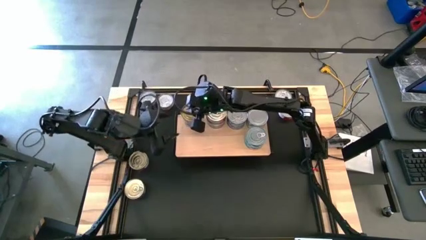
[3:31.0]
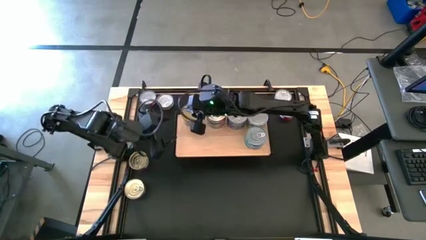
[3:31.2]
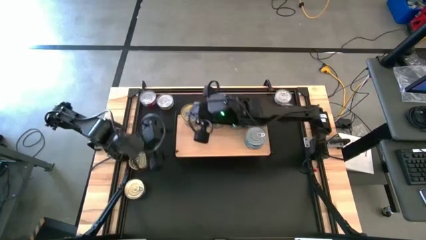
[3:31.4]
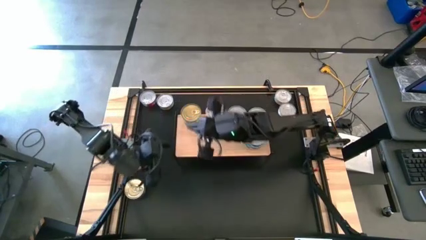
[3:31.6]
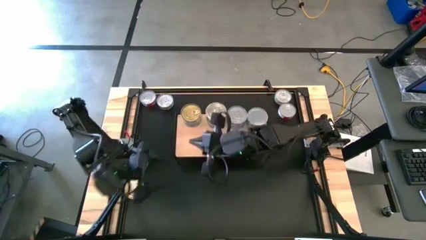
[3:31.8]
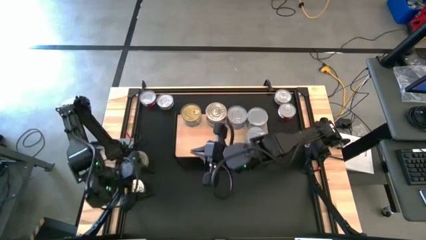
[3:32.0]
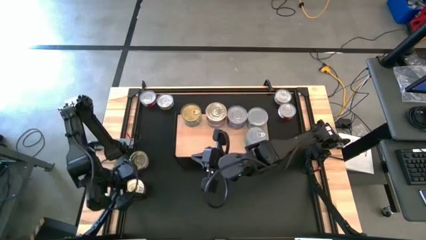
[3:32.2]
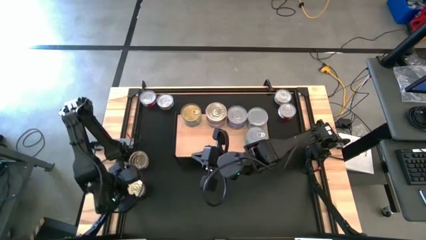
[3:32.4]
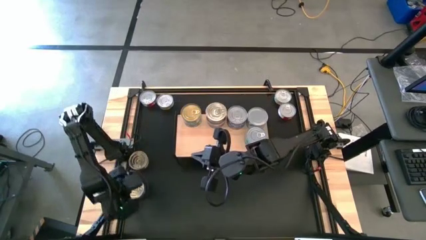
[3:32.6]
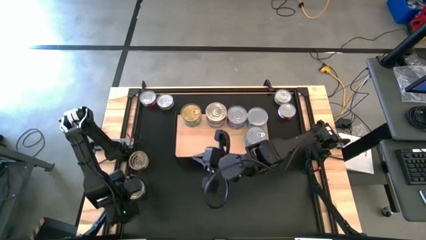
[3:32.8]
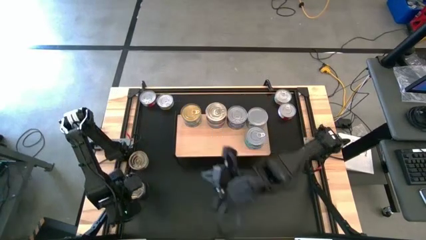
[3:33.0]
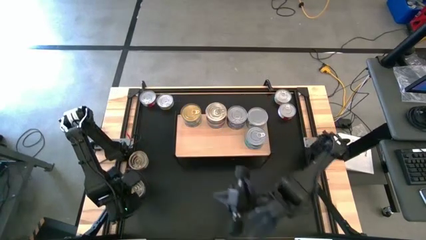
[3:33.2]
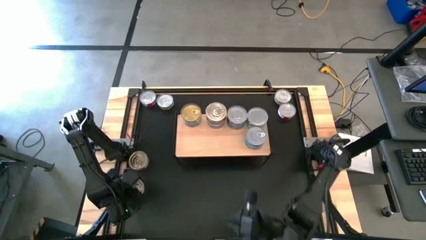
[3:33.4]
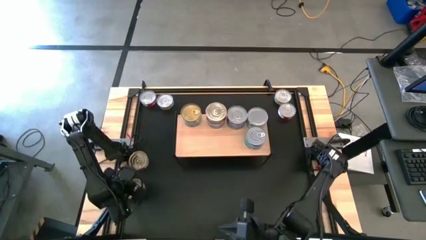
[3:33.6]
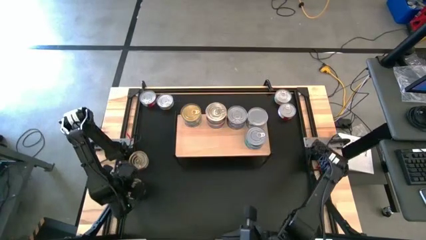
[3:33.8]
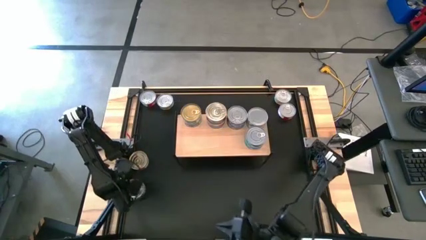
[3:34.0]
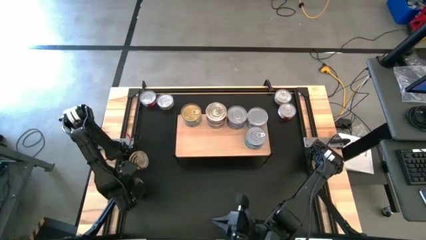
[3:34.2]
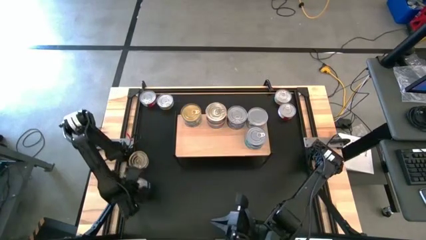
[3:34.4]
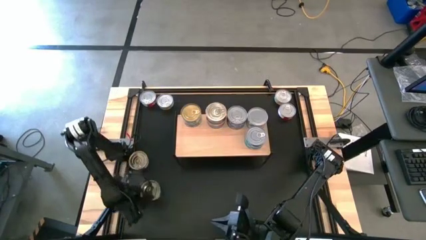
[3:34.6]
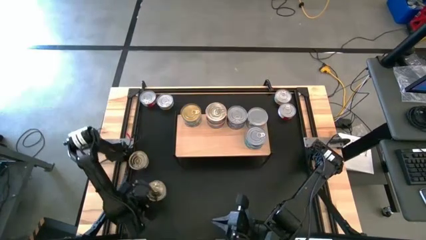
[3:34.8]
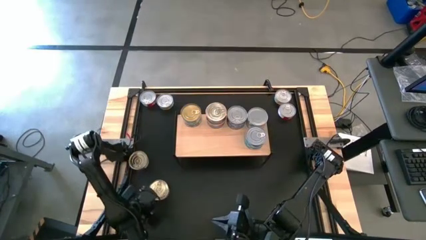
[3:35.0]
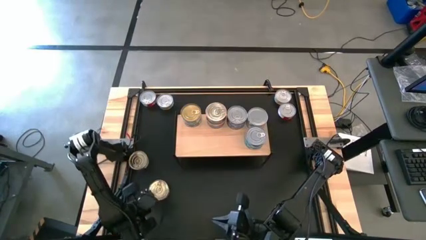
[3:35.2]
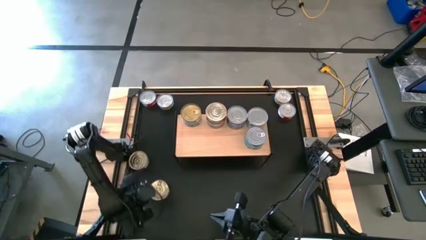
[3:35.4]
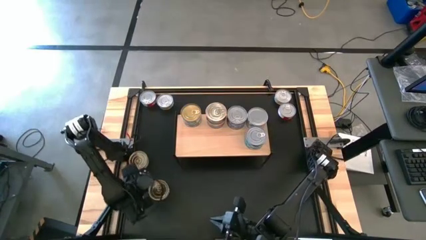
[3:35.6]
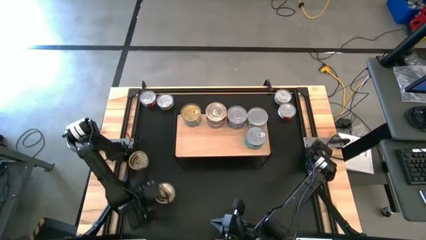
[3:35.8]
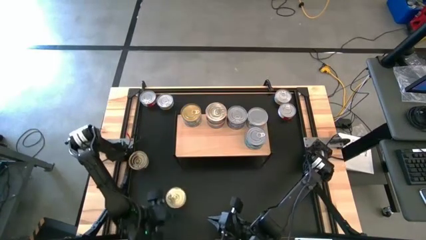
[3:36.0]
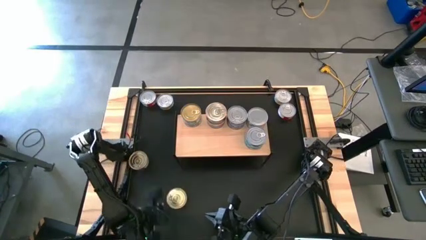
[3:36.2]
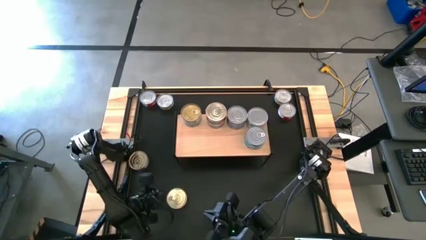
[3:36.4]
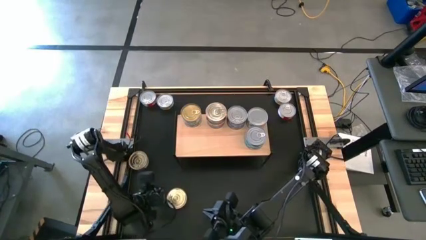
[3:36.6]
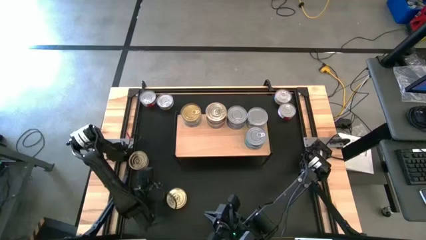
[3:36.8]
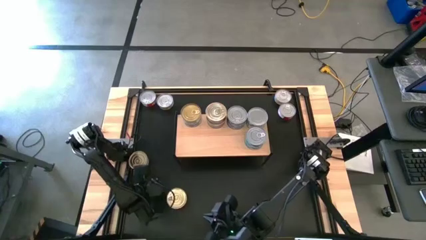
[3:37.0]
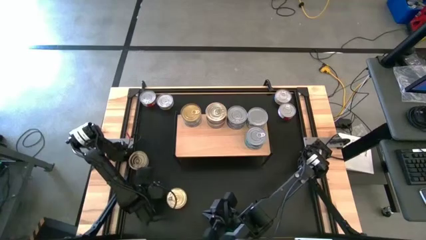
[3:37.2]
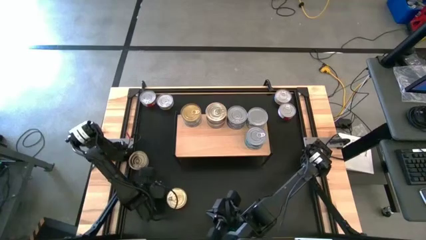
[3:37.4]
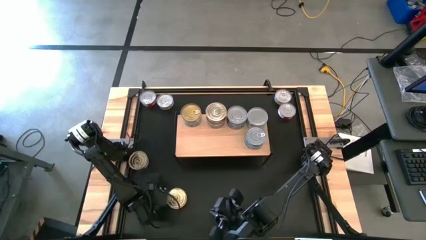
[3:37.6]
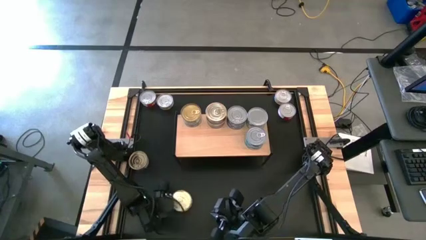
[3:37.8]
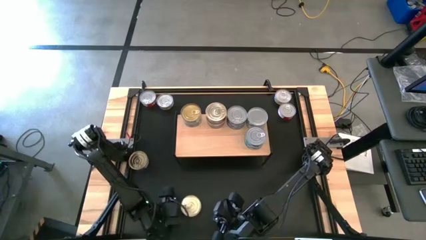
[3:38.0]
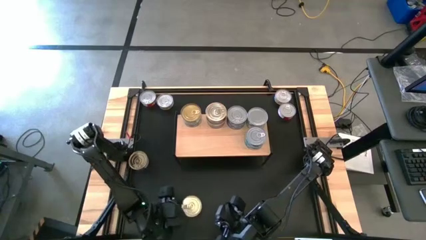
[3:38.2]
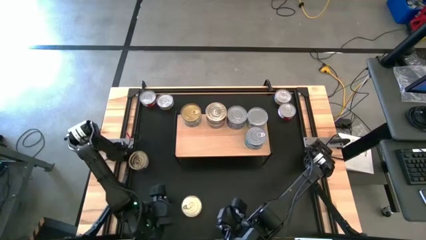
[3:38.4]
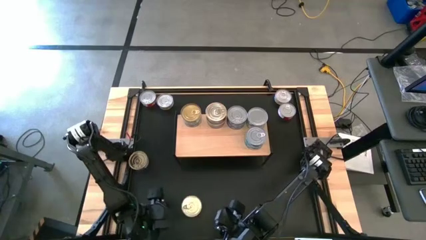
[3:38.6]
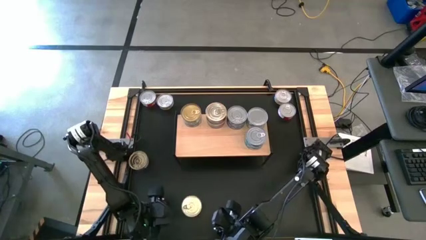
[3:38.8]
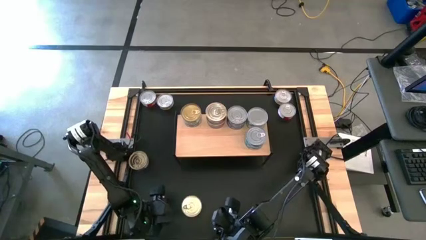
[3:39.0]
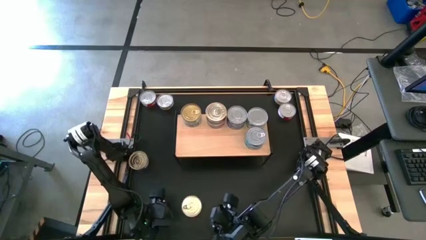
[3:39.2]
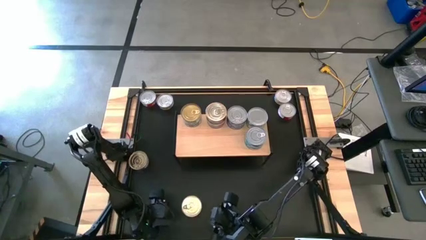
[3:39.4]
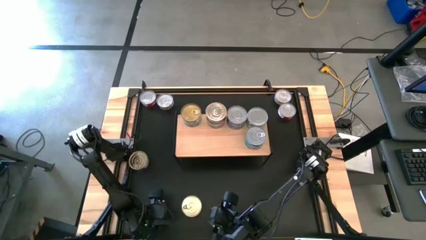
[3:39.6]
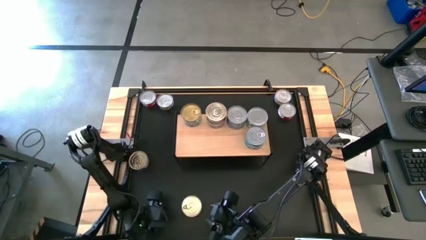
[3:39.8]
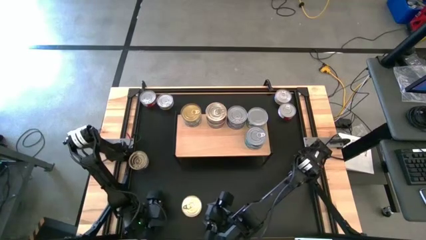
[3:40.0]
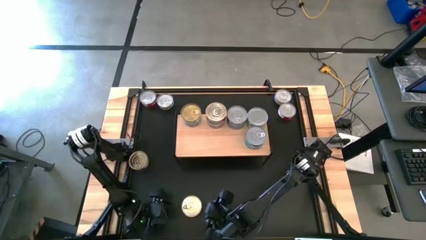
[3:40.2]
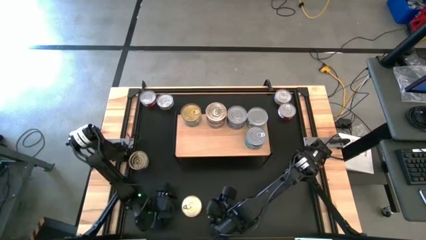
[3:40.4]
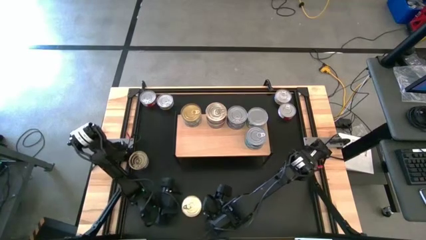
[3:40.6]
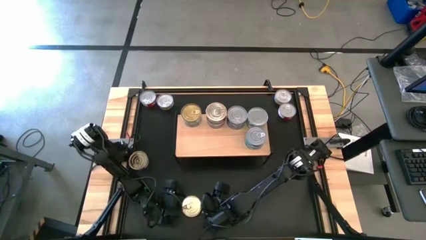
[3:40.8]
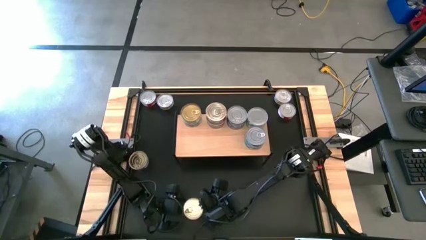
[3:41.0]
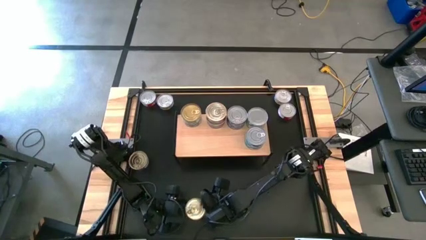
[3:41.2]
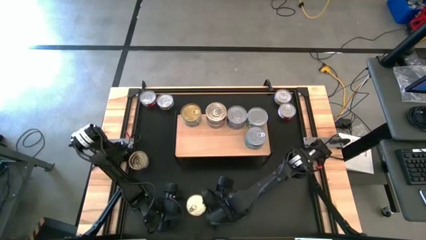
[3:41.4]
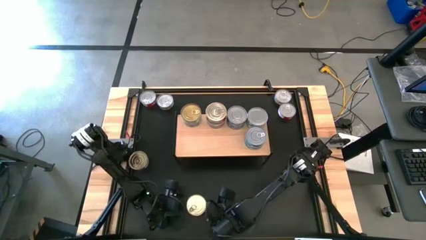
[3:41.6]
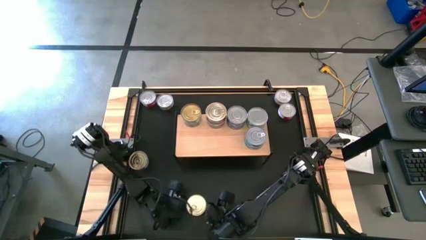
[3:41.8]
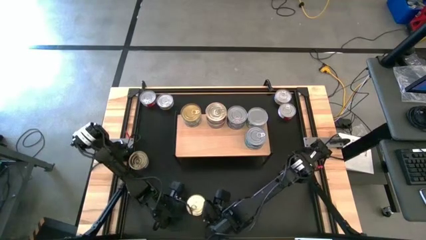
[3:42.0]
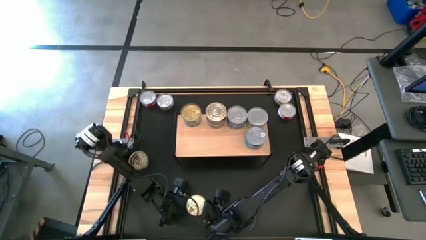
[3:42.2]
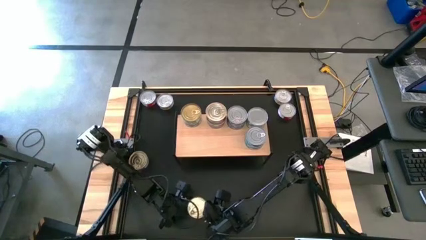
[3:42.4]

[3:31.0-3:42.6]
Task: Stack canned seafood by type on shelf
Put the blue pink tuna can on the shelf

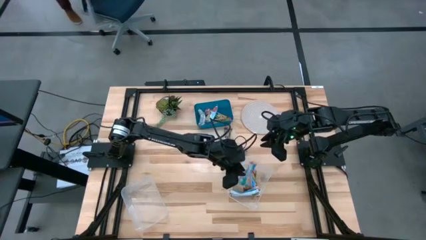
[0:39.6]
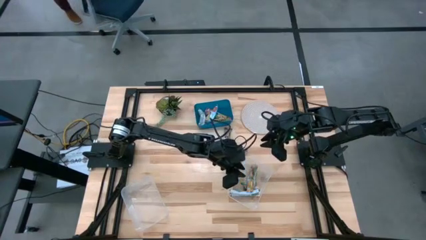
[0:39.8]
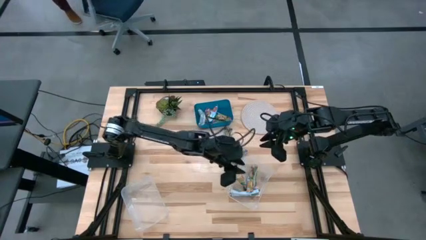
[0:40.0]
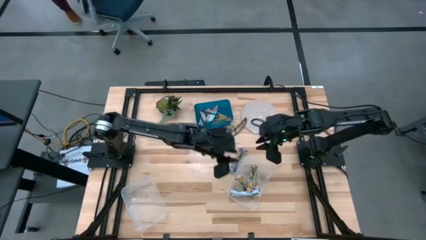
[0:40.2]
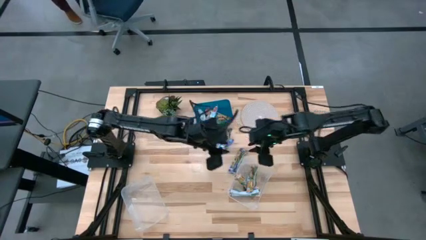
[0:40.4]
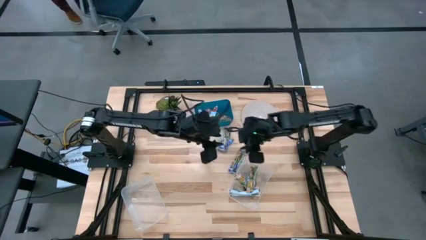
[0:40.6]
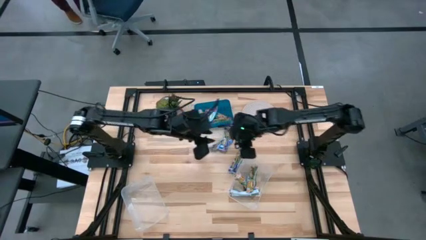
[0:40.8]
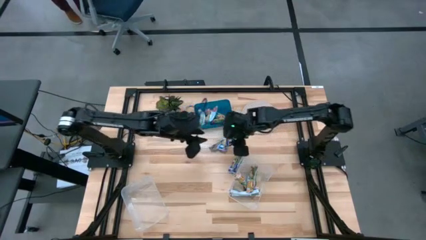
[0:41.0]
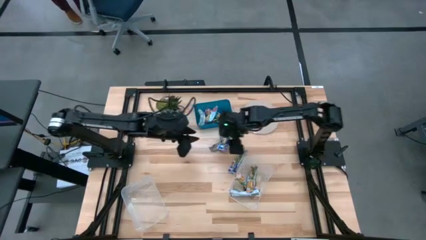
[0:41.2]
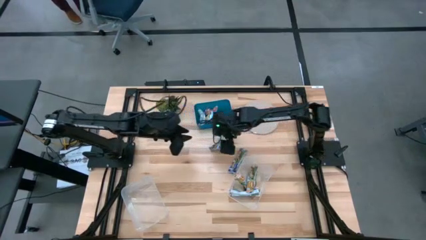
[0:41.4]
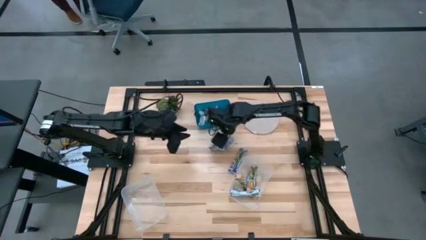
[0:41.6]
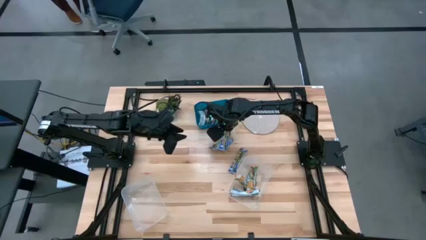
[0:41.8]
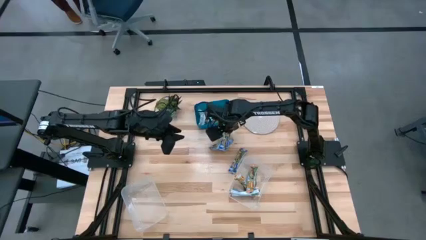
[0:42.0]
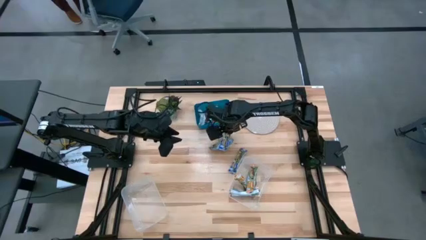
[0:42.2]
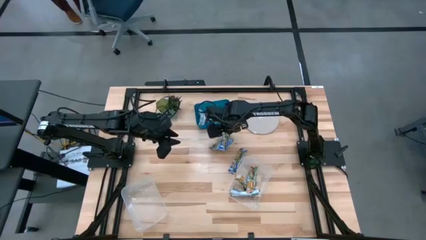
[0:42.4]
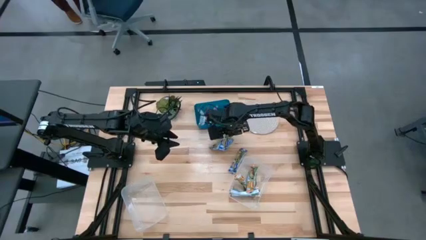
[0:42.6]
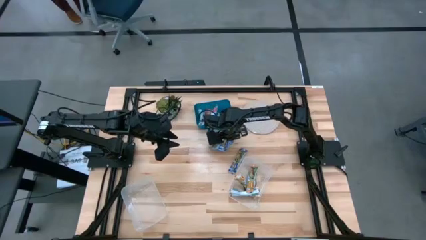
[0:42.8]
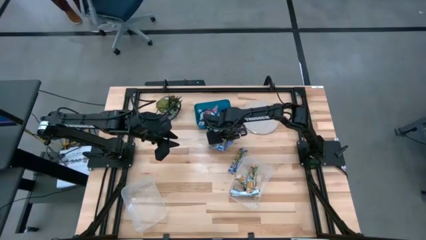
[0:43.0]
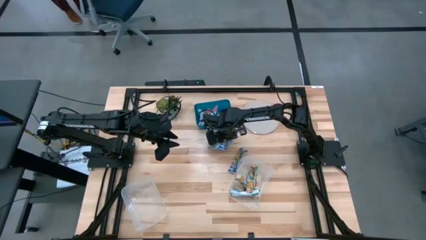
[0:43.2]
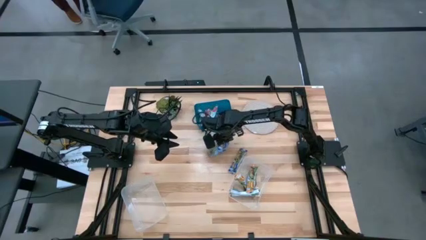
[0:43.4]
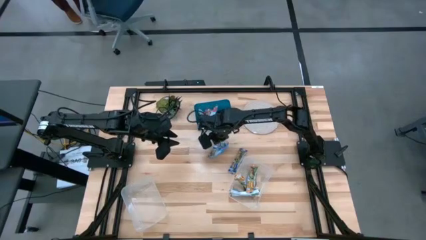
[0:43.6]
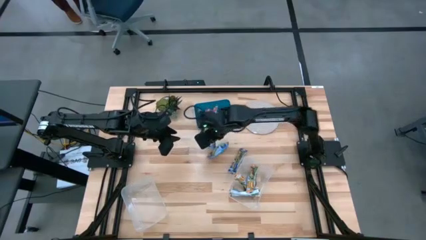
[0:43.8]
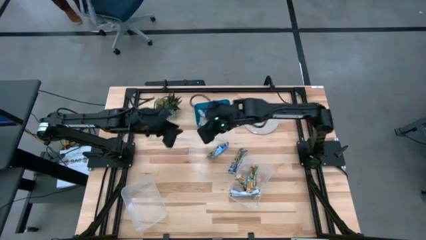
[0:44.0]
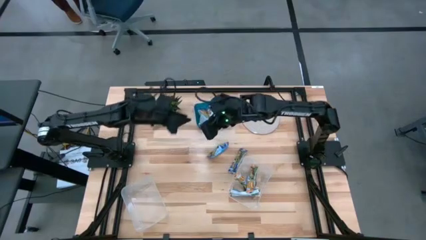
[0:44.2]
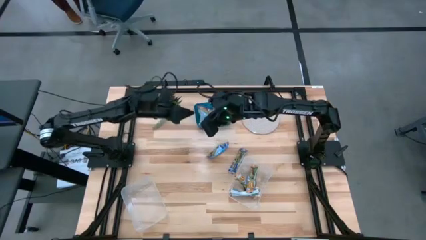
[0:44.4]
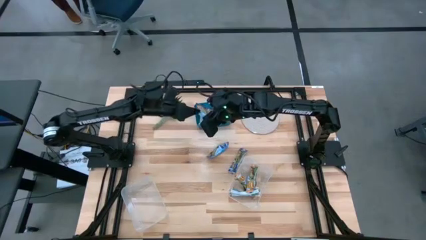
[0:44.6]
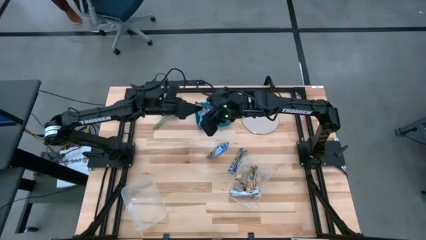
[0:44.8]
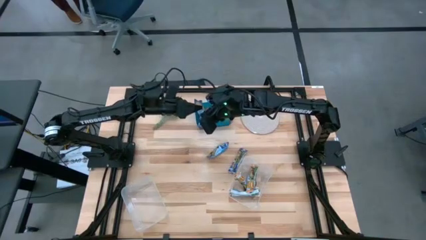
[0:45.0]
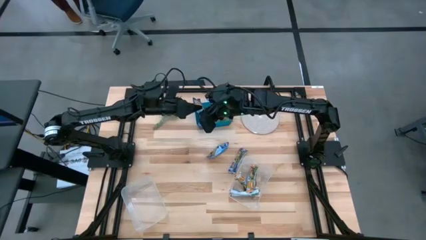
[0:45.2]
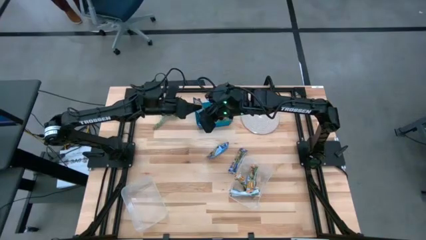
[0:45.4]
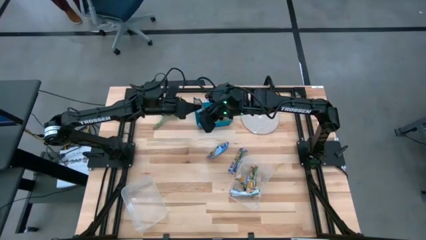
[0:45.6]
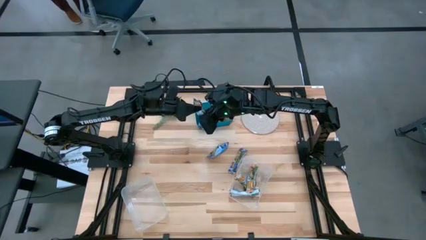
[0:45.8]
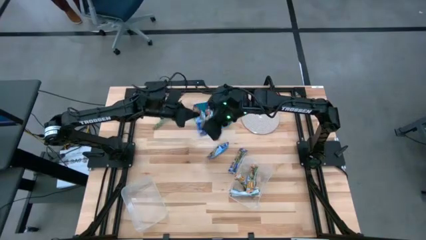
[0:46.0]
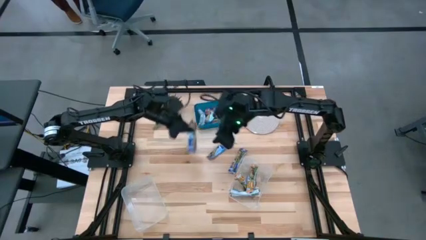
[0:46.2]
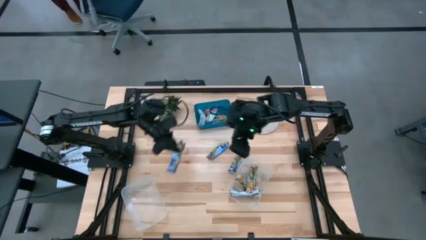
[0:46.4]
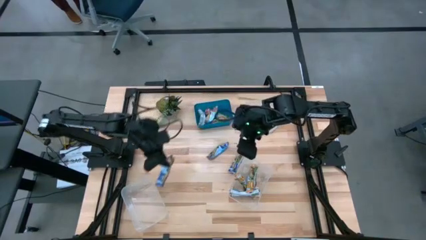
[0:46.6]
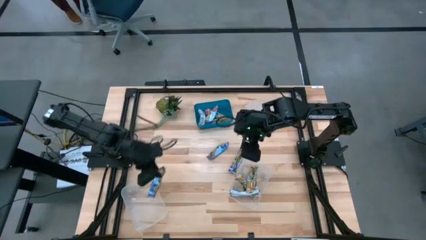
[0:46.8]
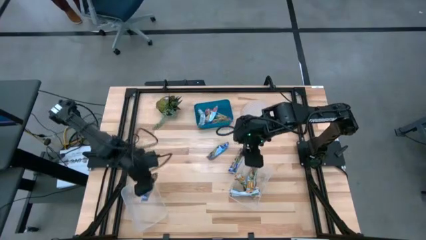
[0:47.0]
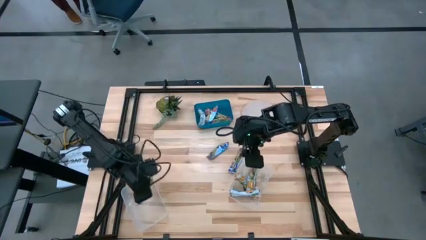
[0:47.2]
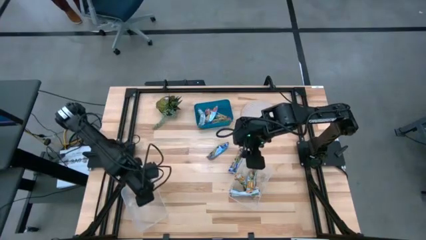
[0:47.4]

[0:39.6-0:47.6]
Task: Pick and place Granola Bars by type
Put the blue granola bar into the left transparent bin
